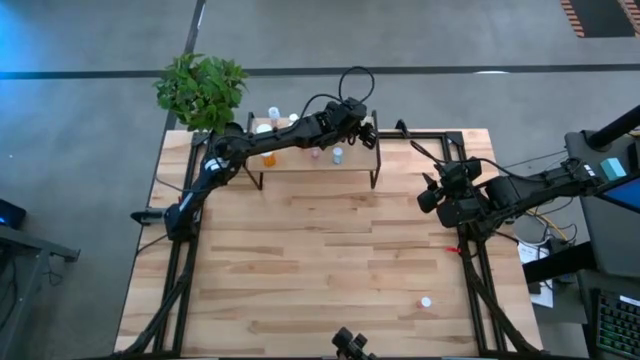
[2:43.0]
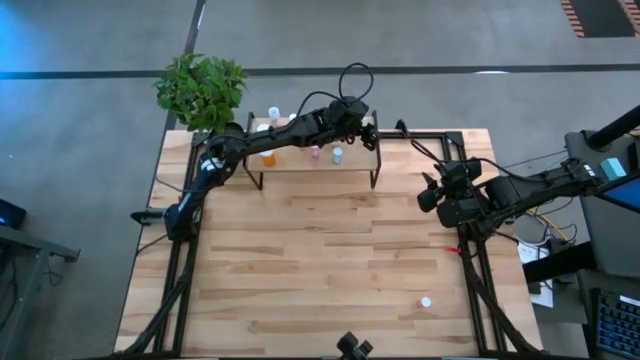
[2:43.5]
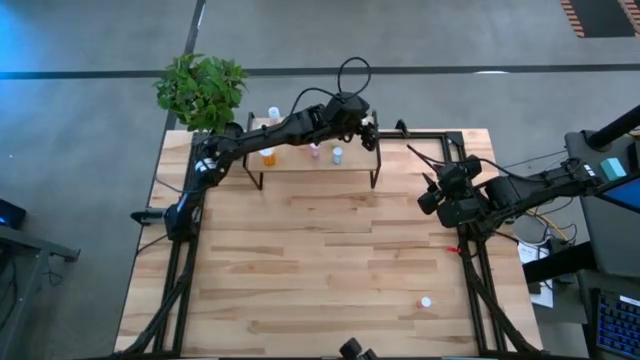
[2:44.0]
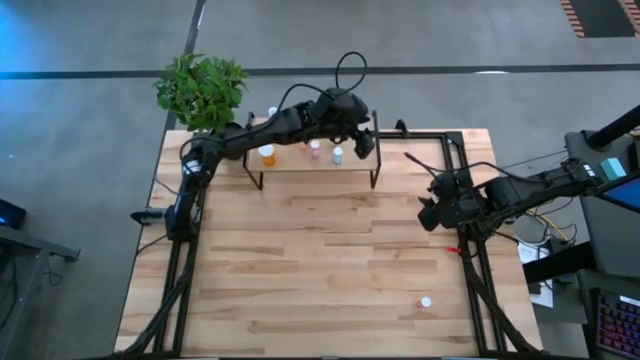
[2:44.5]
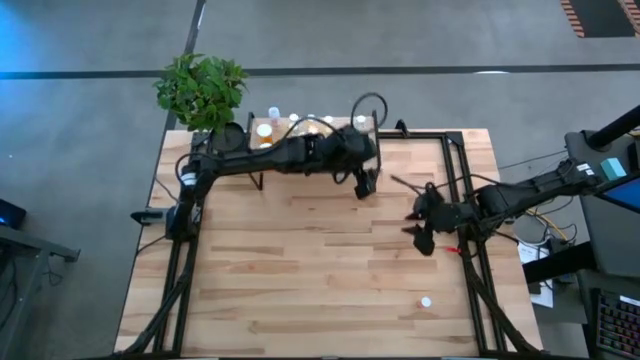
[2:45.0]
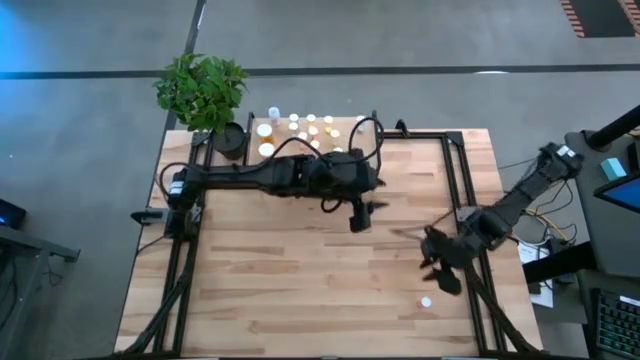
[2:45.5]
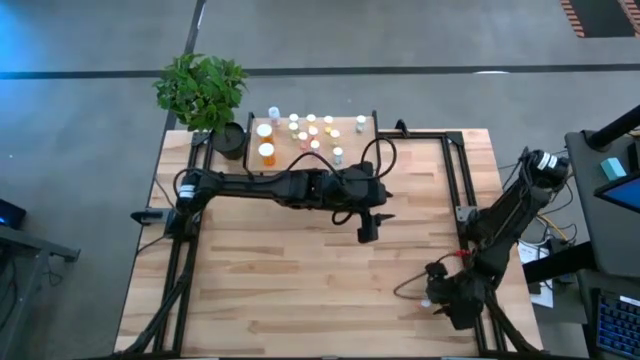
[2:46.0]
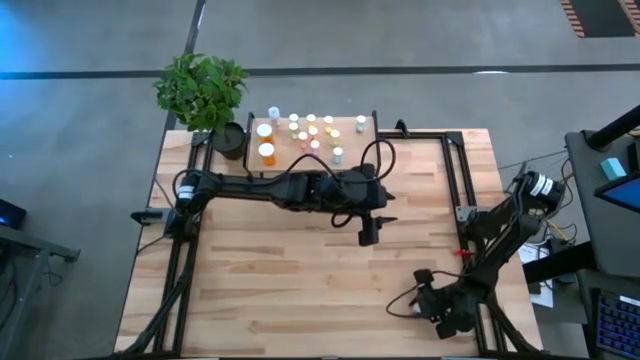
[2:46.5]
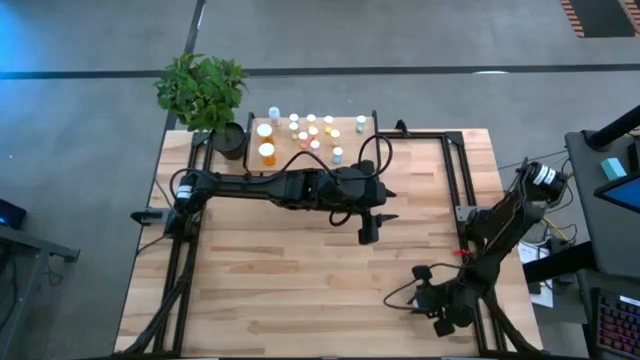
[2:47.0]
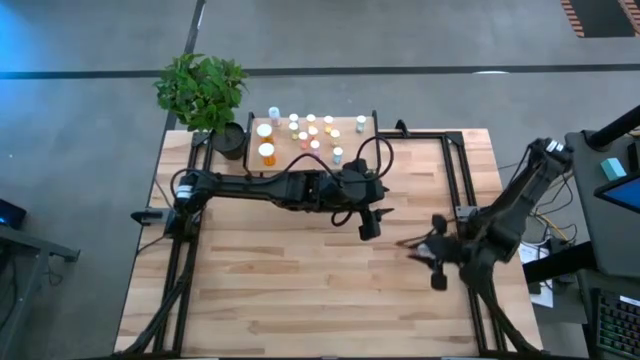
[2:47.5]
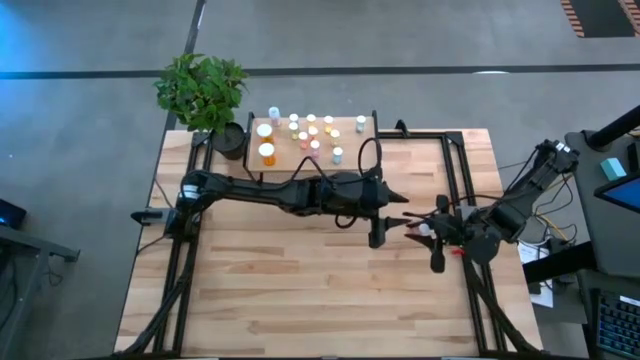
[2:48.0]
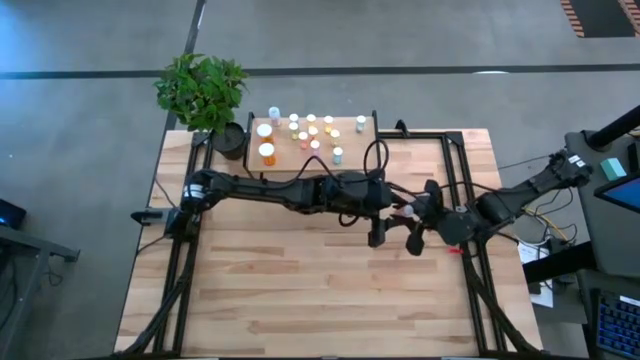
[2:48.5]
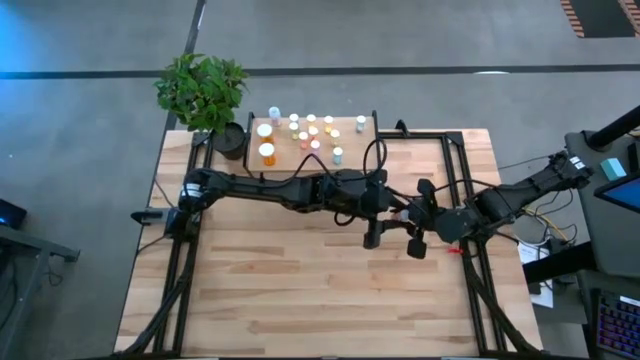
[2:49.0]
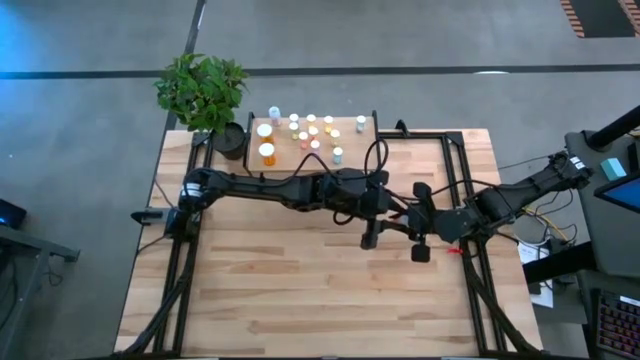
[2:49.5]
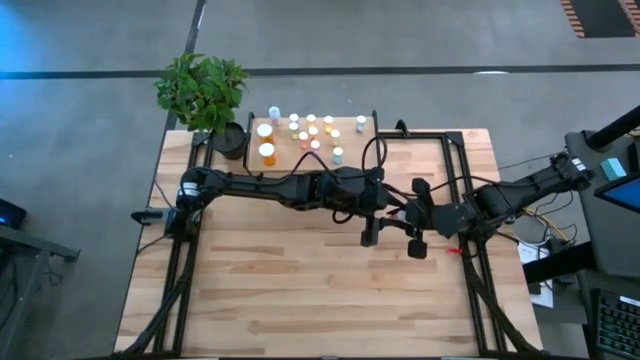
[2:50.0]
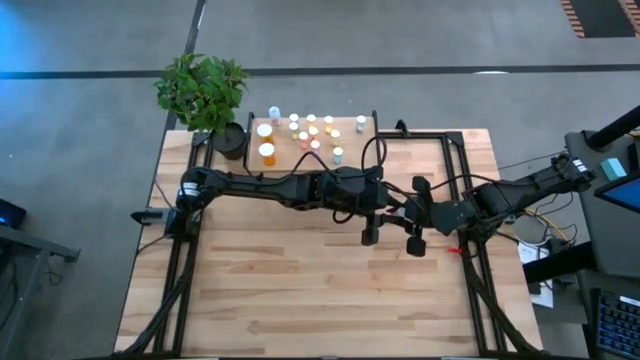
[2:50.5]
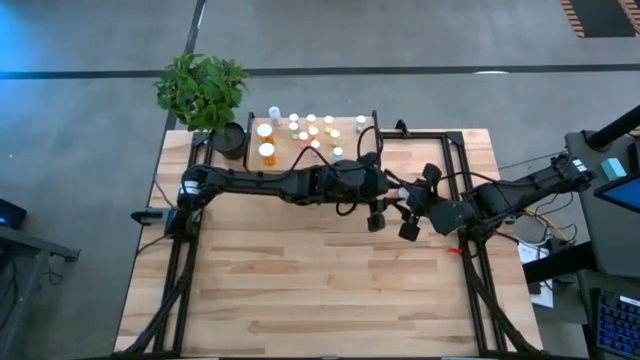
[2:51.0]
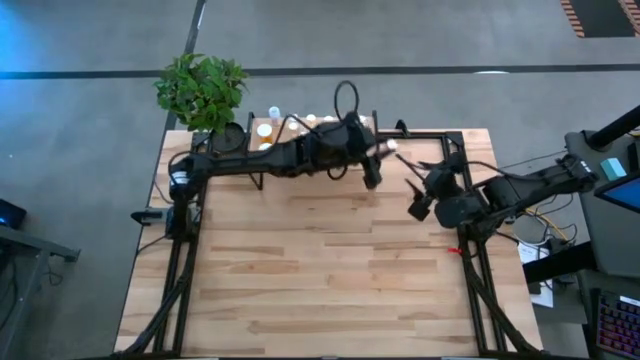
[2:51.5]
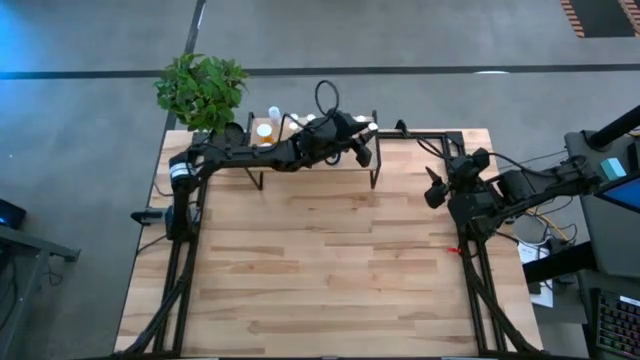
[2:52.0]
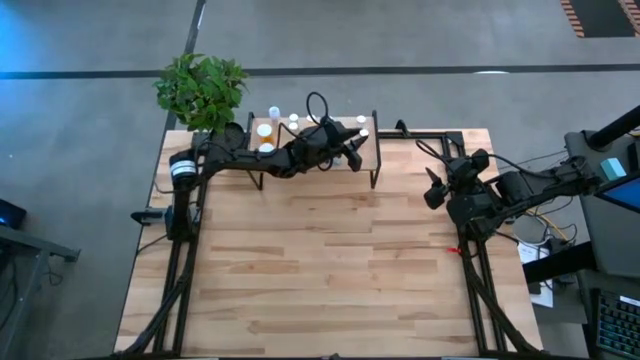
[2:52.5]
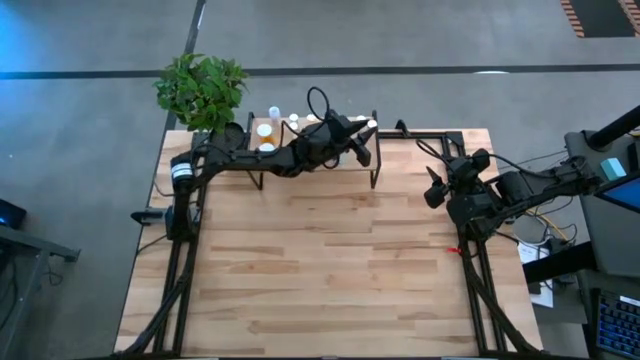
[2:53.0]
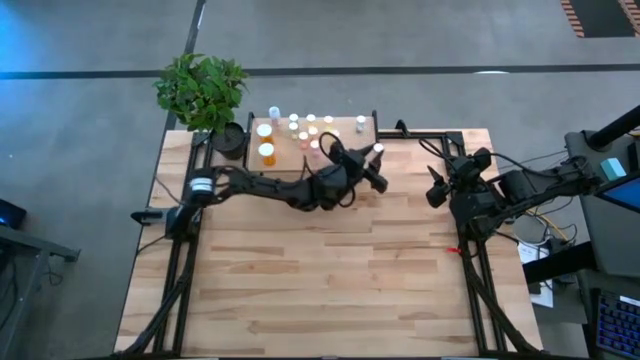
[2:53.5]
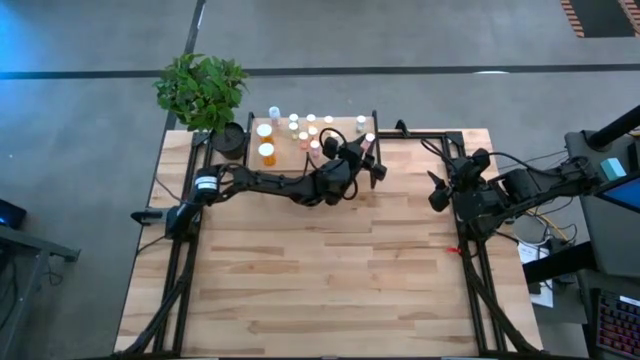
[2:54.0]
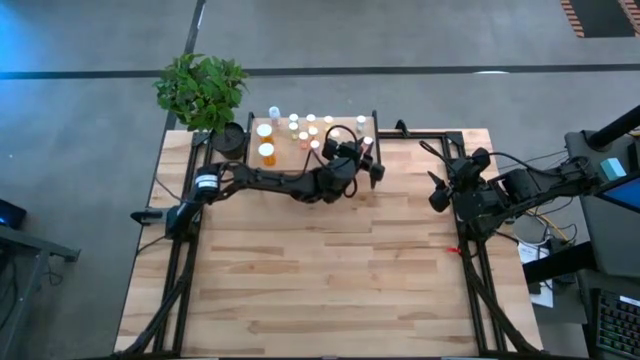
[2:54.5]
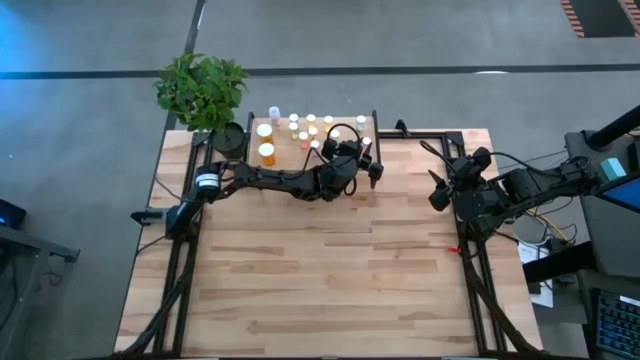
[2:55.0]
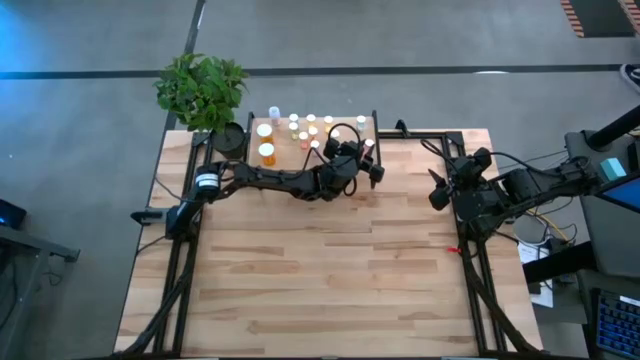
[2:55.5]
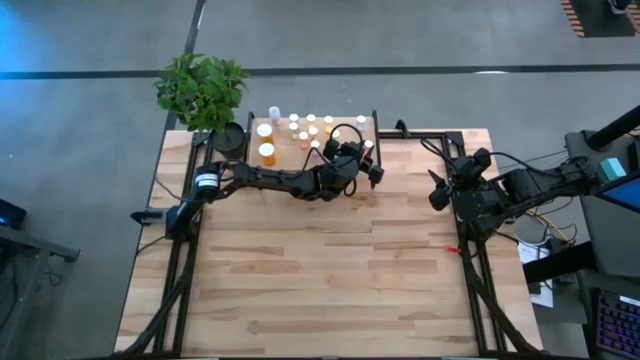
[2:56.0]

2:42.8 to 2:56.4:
Task: Pick and place medicine bottles onto shelf by color
Put the pink pill bottle on the shelf

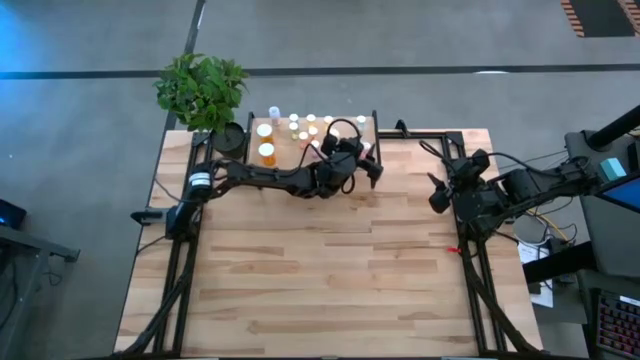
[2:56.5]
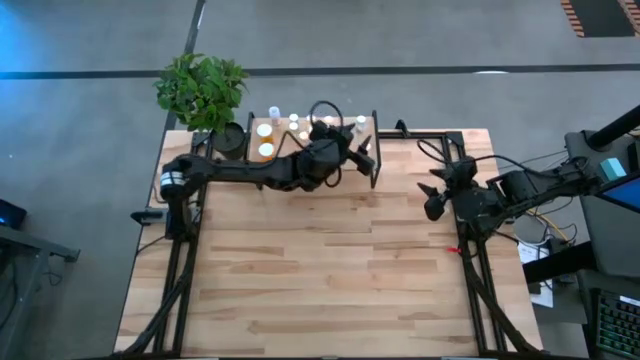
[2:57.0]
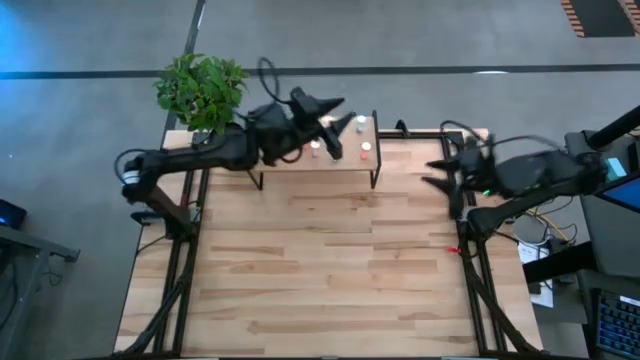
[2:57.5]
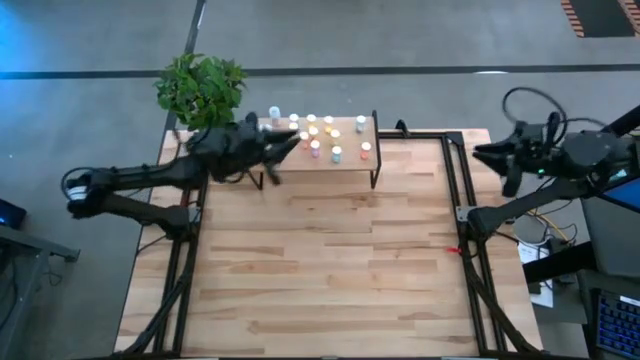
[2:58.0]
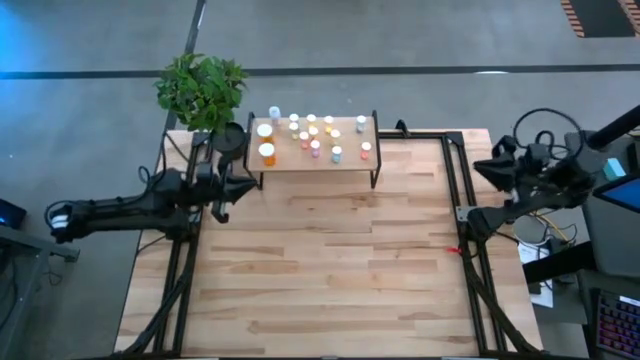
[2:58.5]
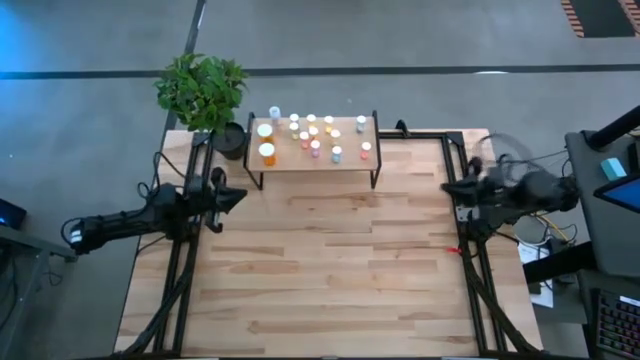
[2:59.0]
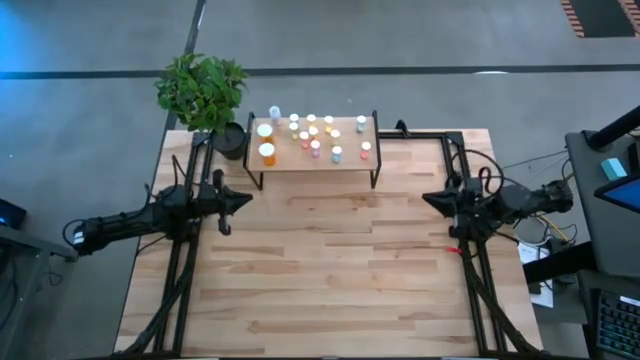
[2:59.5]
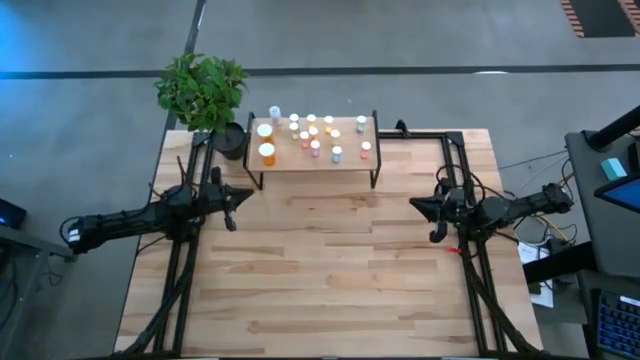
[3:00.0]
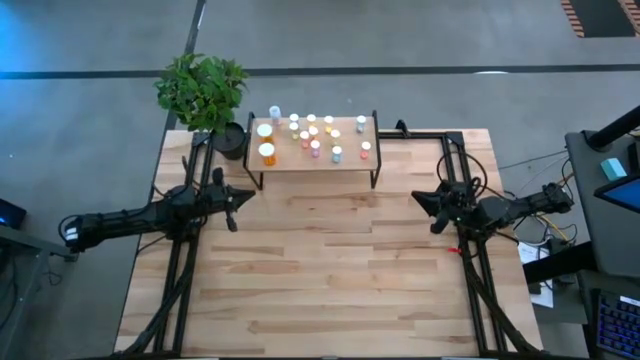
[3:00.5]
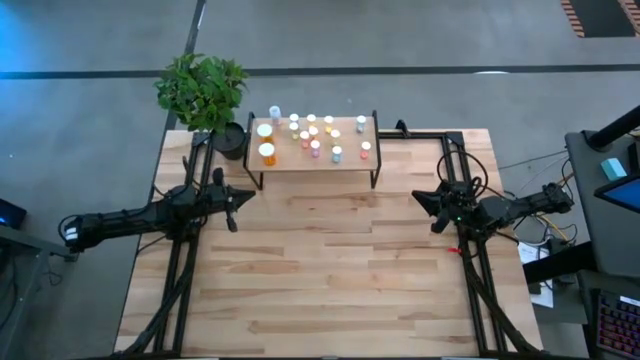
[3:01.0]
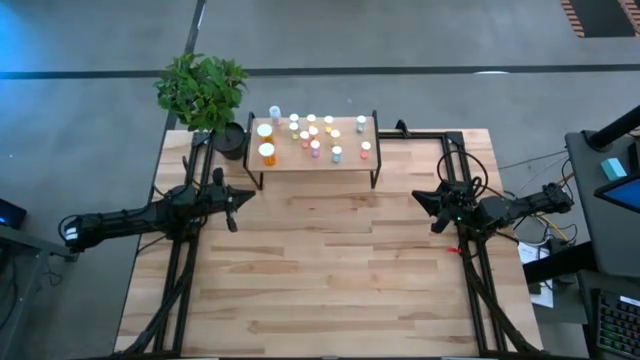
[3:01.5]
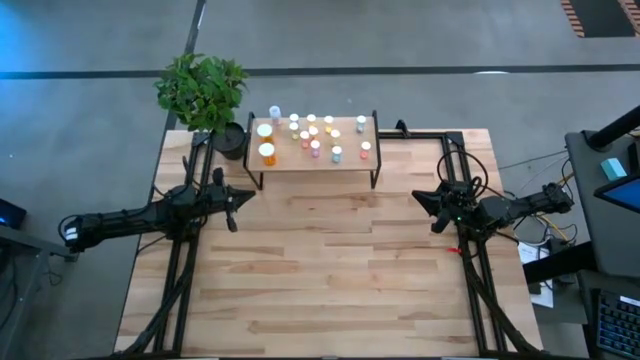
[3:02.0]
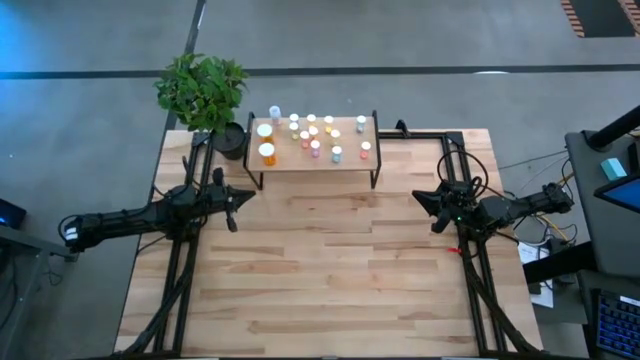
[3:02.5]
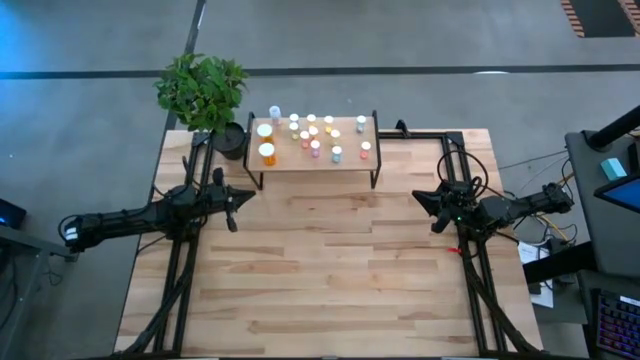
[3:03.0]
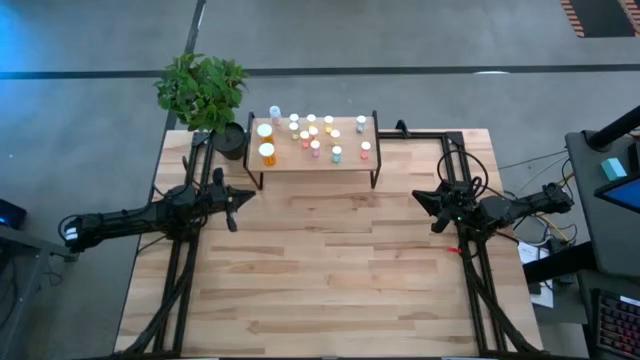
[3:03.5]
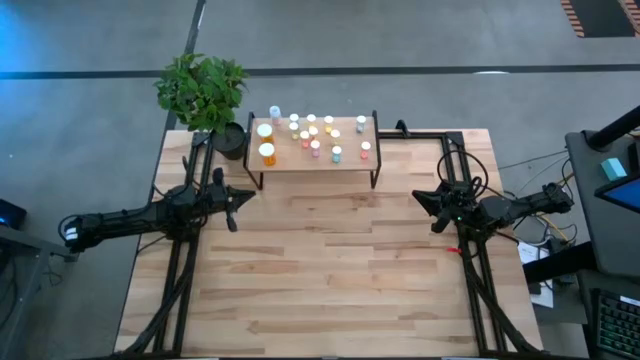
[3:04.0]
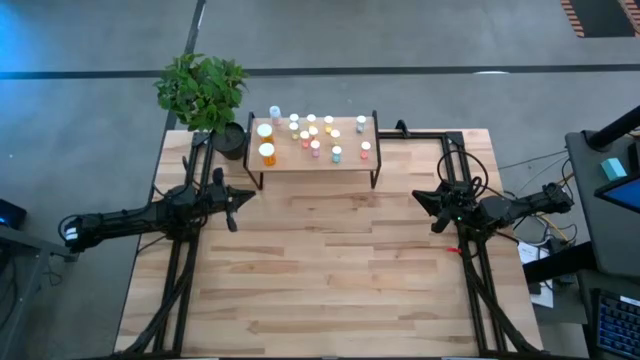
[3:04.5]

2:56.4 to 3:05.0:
Return to Home Position
